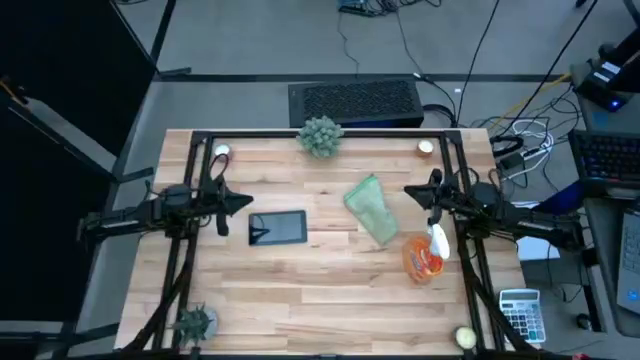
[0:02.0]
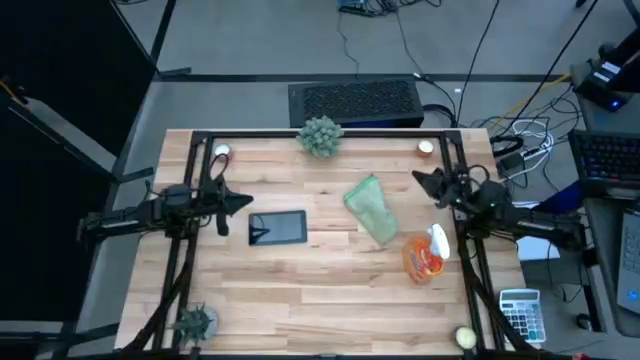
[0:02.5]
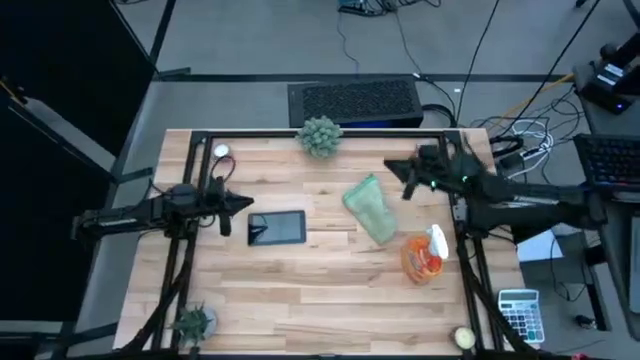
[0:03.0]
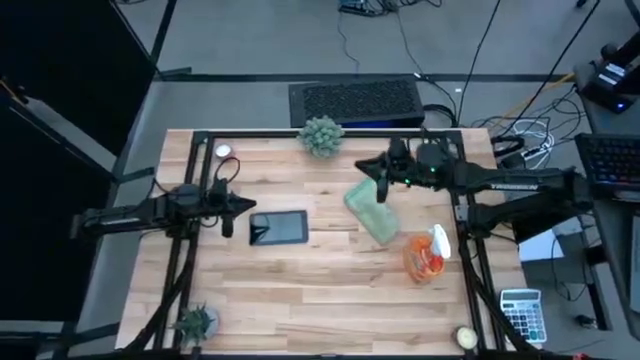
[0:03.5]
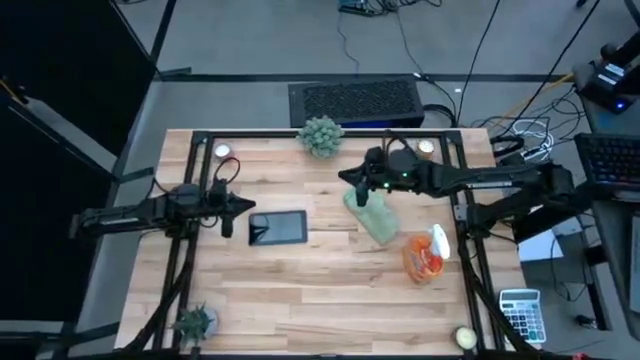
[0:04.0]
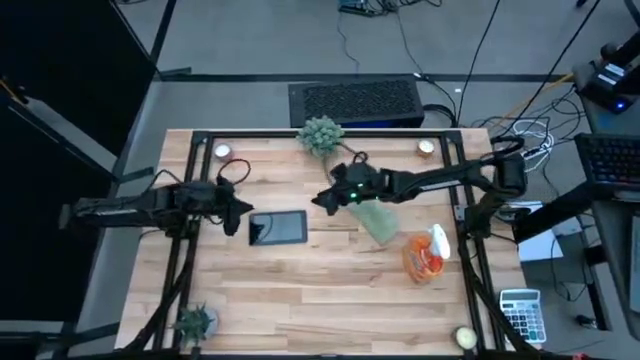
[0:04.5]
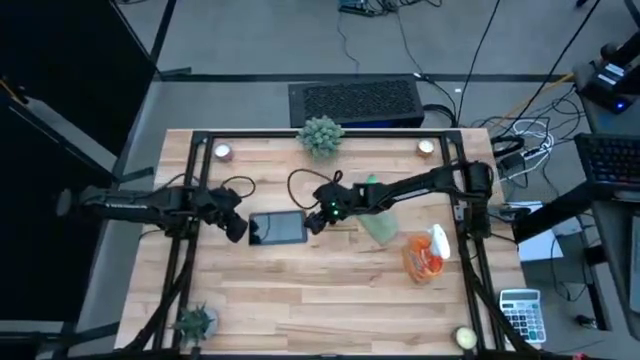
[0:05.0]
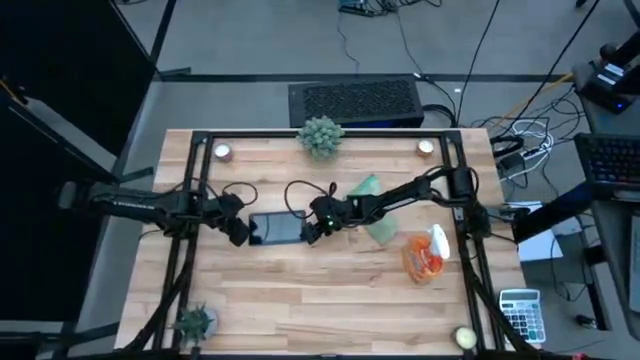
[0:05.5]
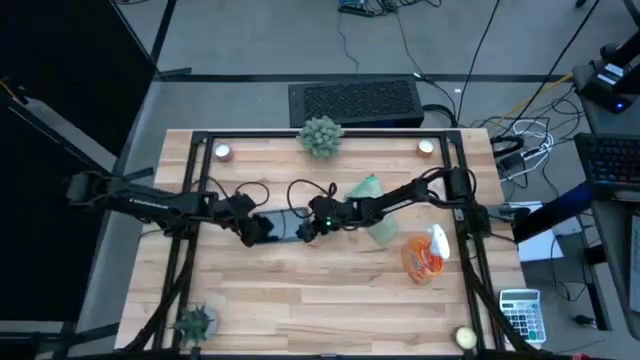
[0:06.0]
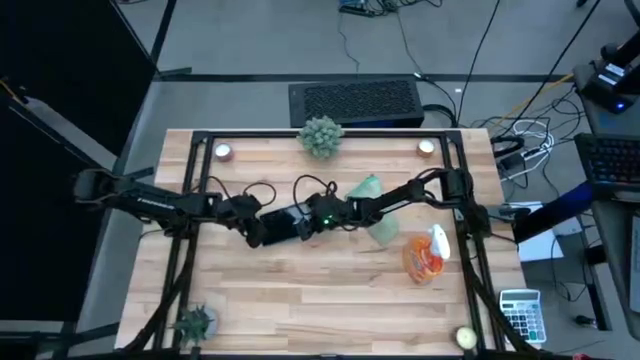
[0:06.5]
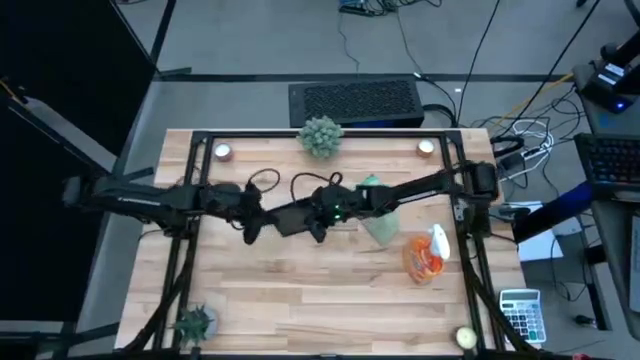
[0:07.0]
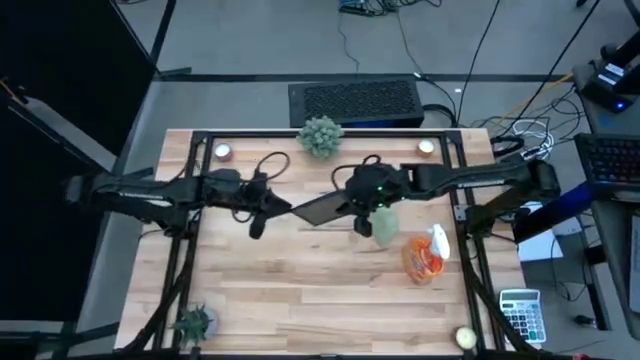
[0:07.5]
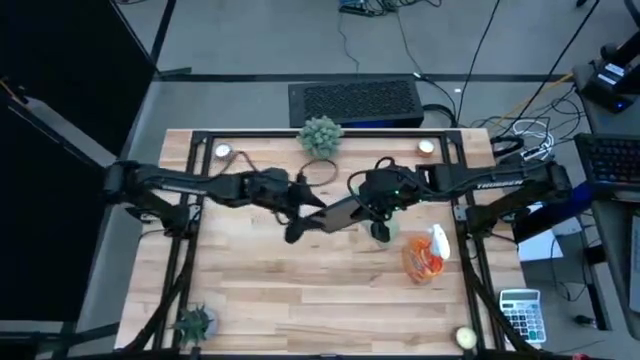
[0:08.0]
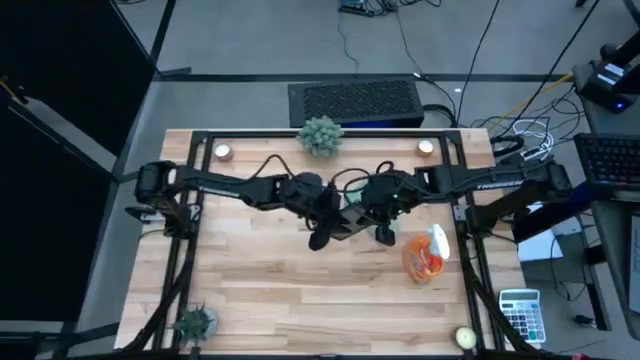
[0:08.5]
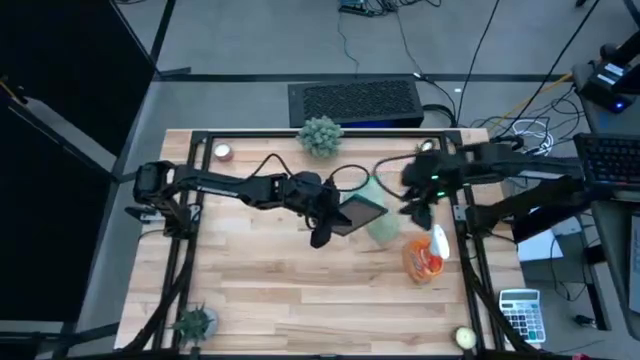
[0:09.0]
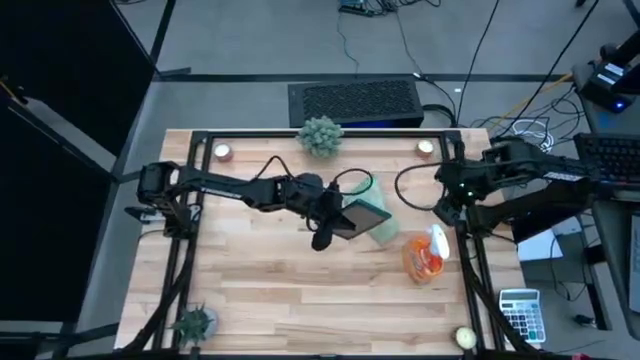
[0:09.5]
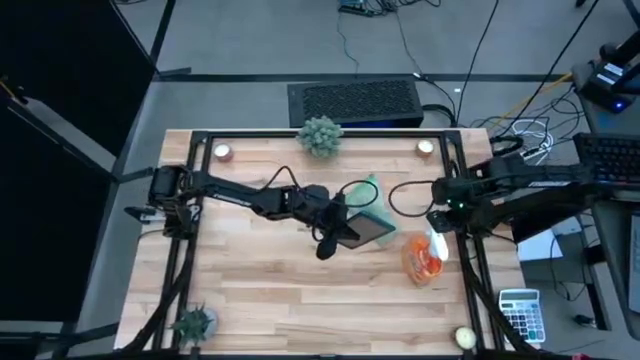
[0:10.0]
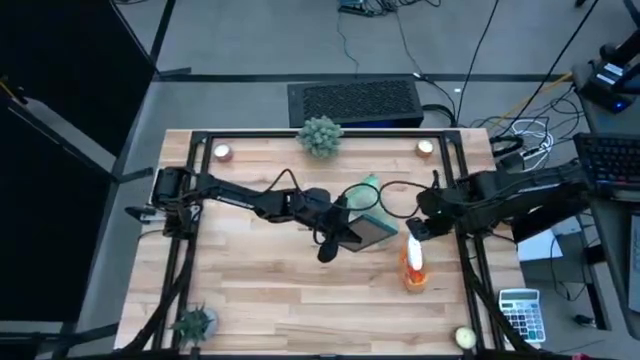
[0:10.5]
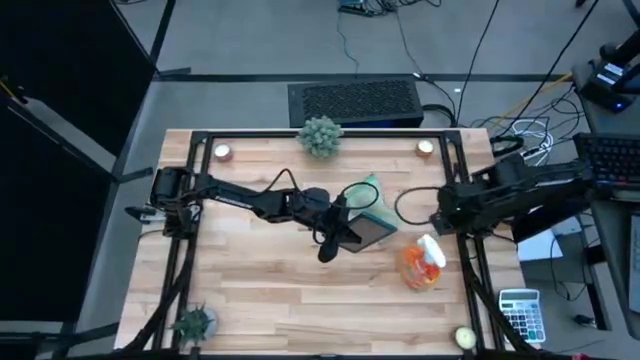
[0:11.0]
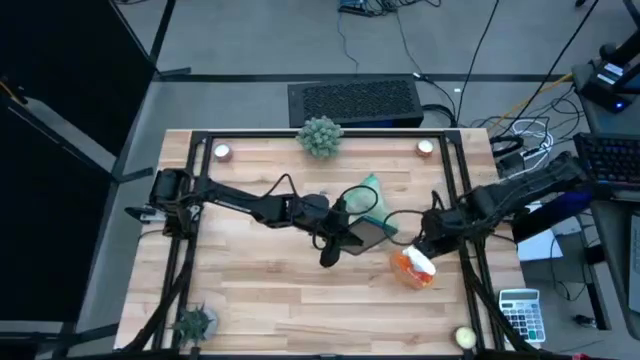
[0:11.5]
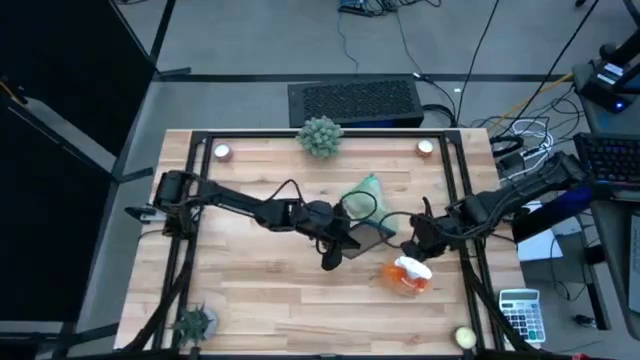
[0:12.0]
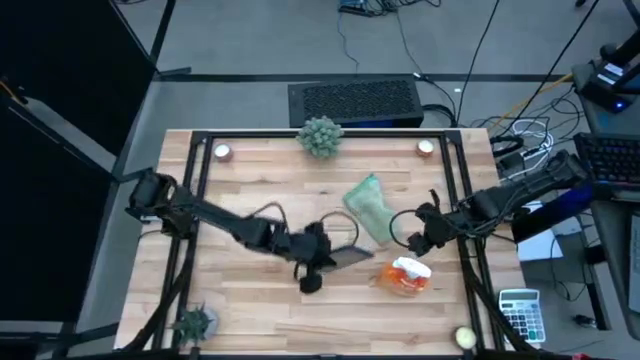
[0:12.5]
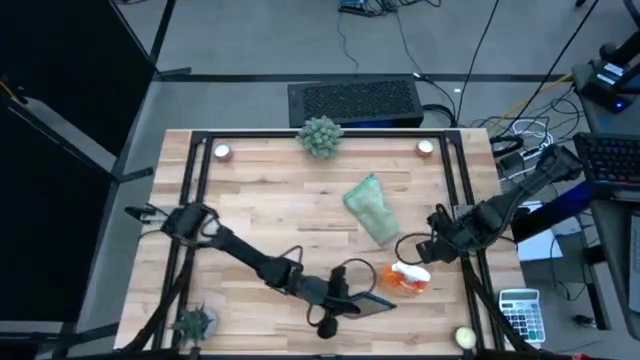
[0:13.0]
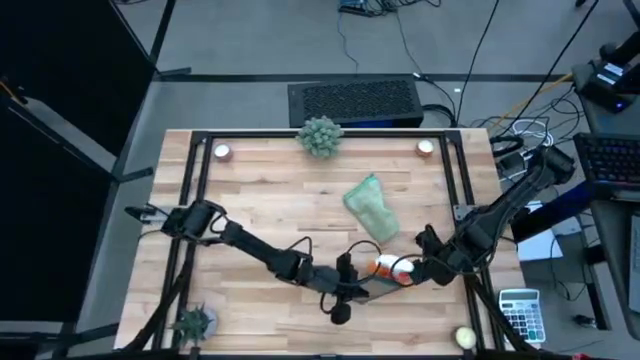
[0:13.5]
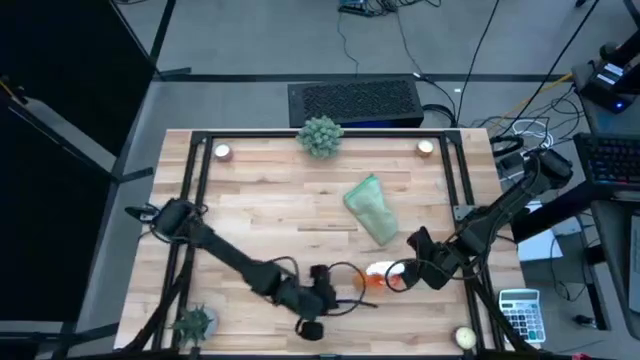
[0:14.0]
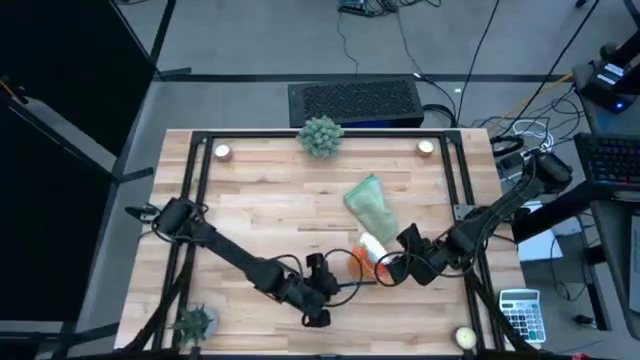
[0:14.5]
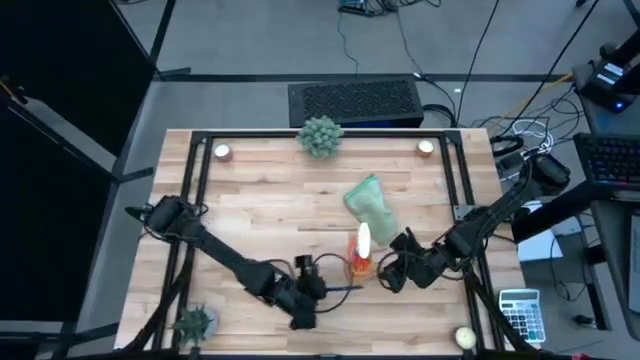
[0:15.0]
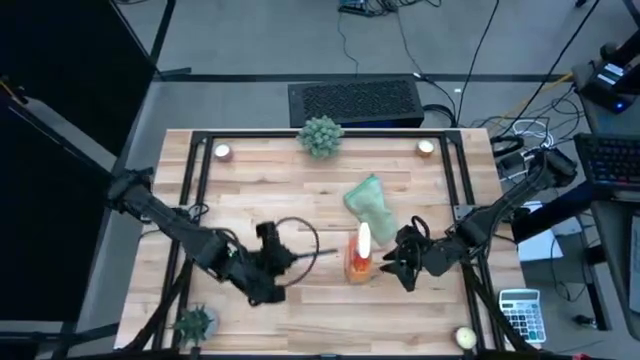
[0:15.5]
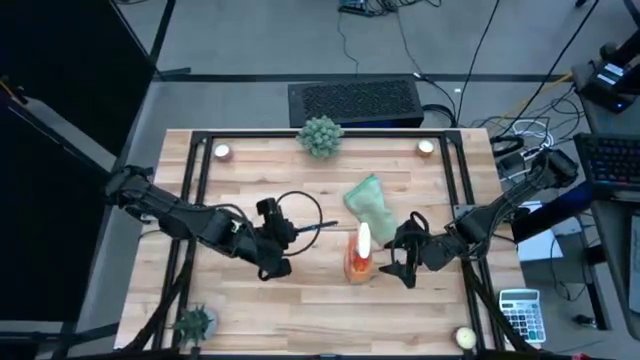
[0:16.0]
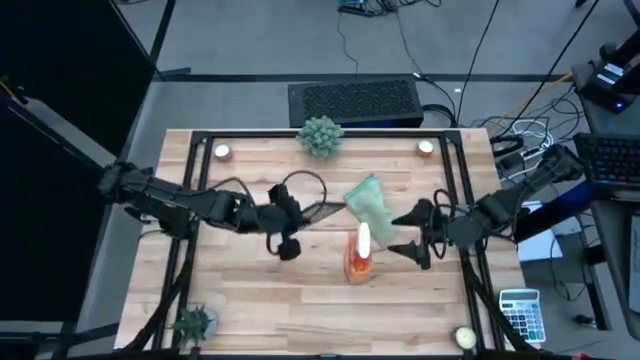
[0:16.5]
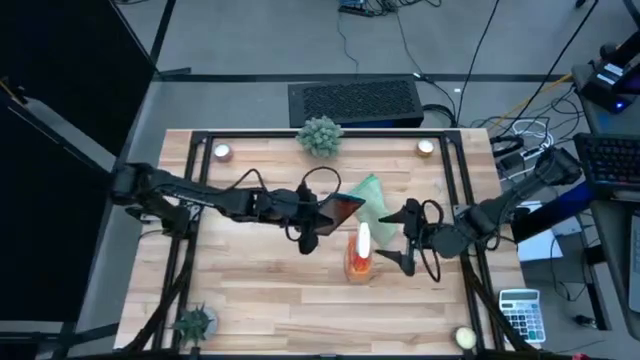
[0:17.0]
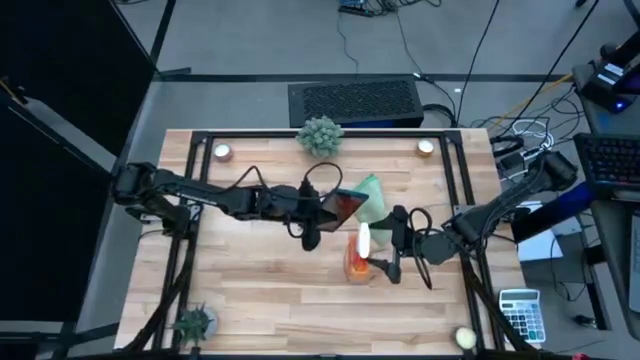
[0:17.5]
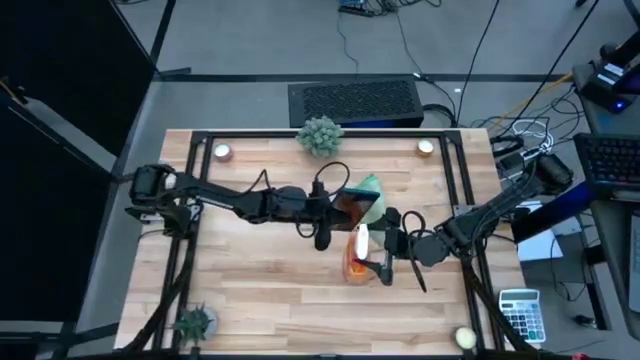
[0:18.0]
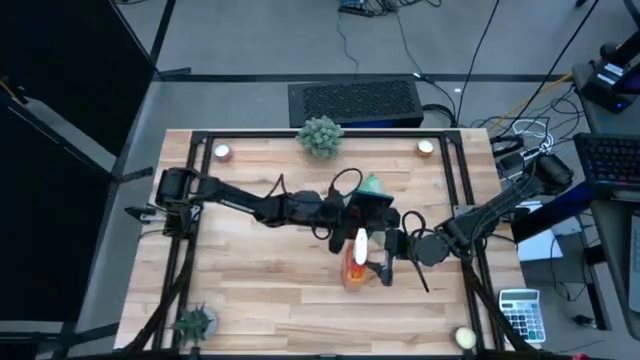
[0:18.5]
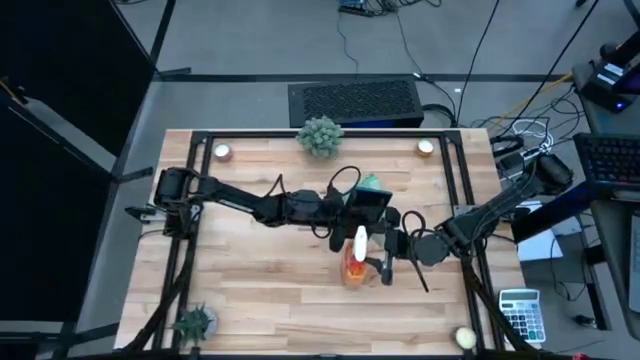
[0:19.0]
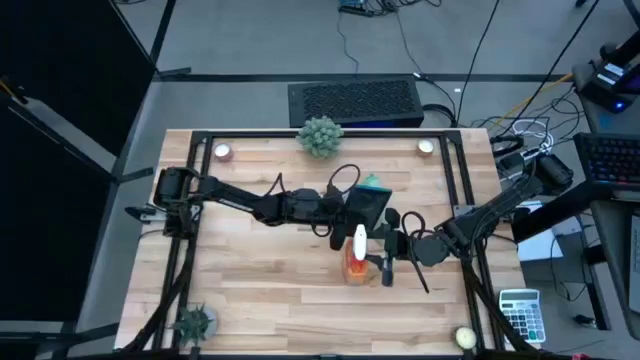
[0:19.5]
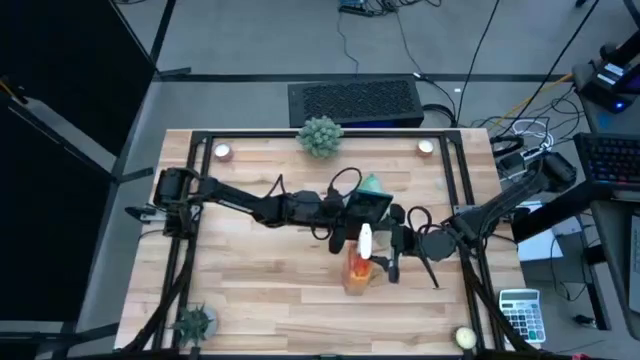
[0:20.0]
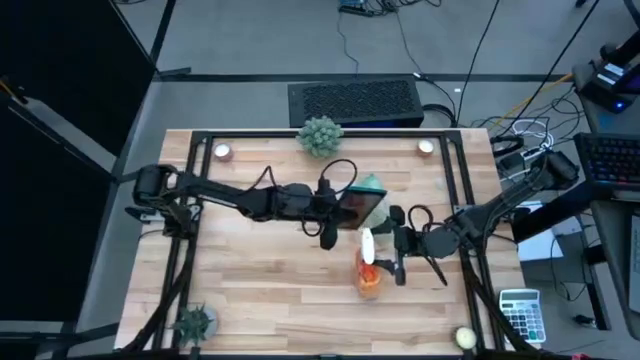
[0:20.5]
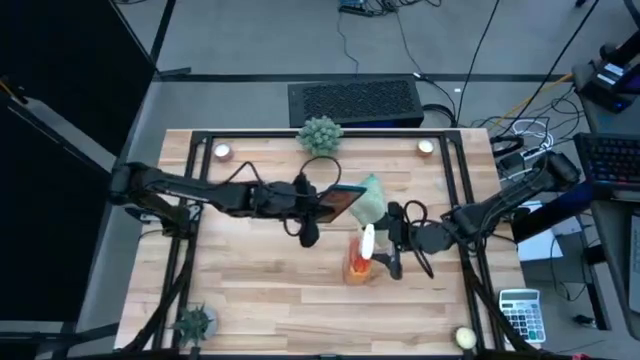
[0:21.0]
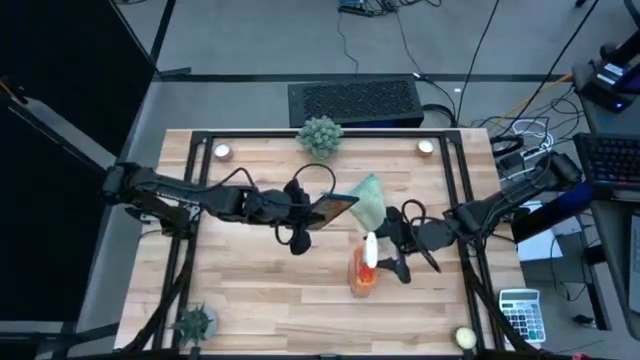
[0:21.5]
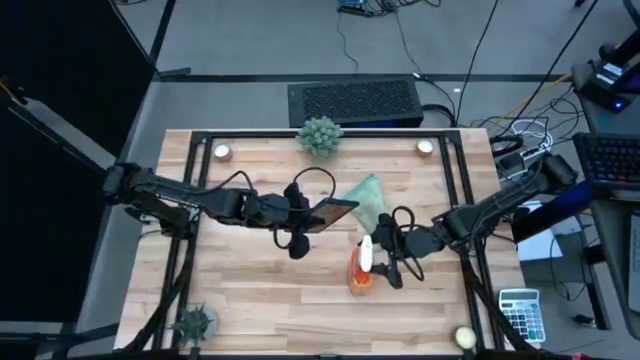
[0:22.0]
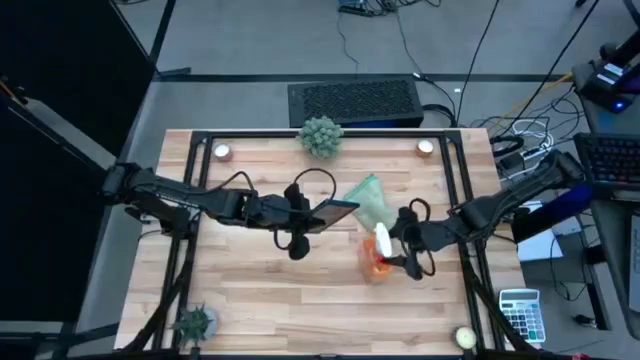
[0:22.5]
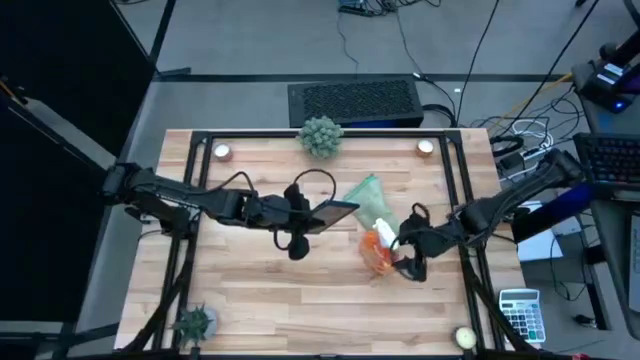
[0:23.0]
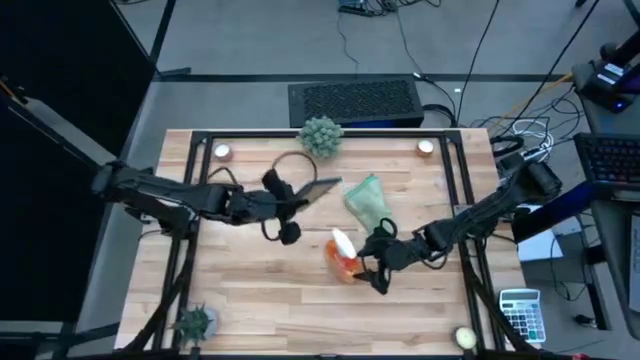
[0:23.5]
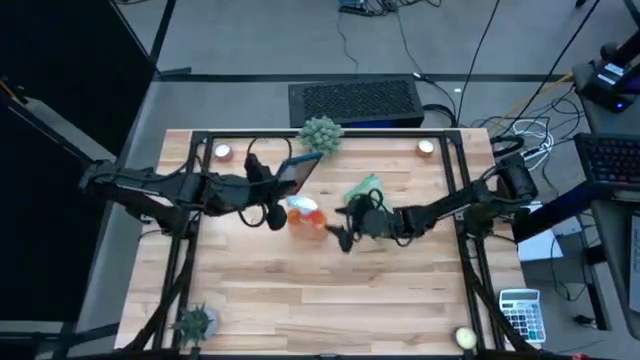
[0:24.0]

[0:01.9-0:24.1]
Task: Apply microfiber cloth
Spray the front of the cellphone with a spray bottle
